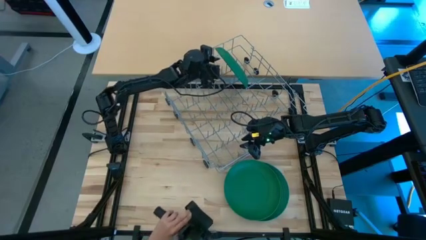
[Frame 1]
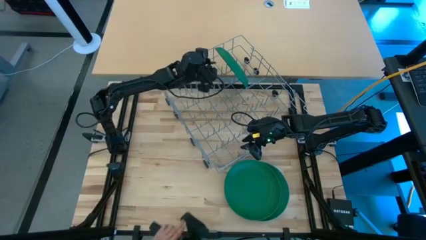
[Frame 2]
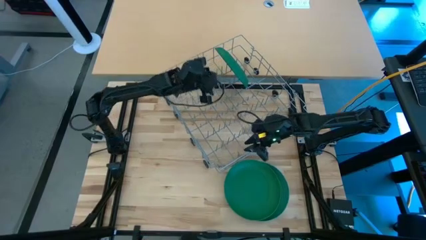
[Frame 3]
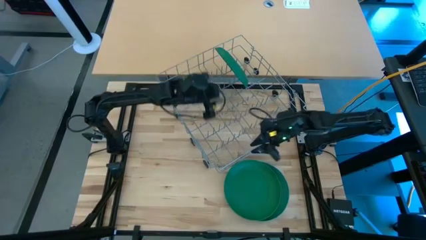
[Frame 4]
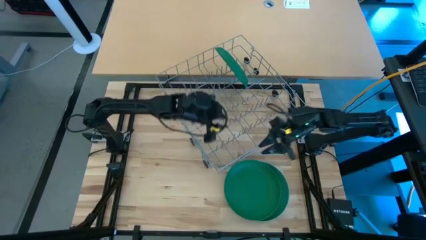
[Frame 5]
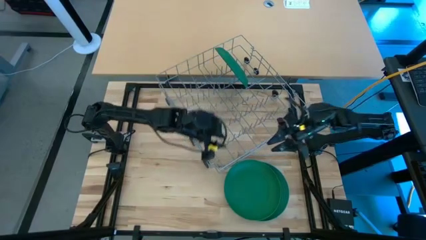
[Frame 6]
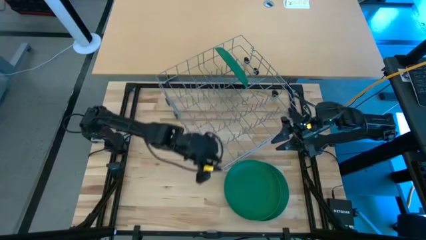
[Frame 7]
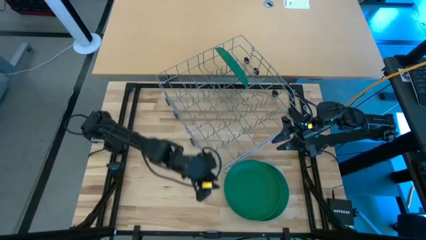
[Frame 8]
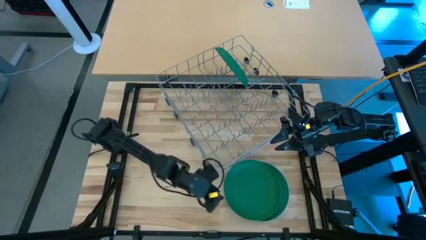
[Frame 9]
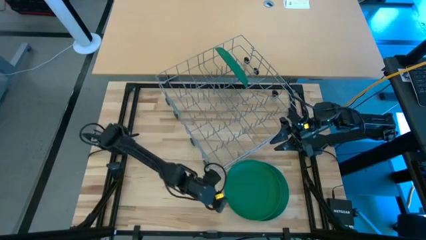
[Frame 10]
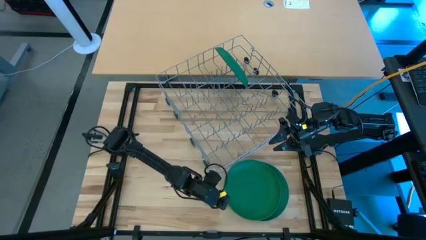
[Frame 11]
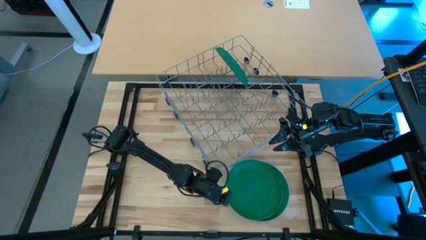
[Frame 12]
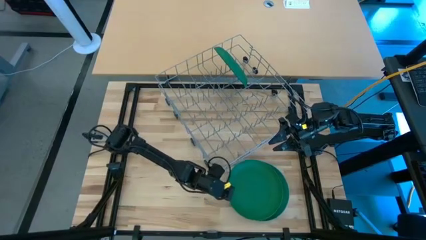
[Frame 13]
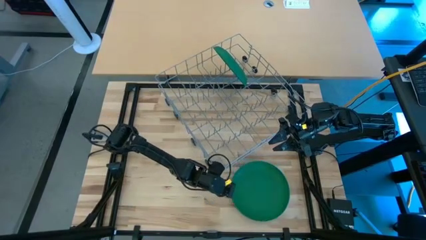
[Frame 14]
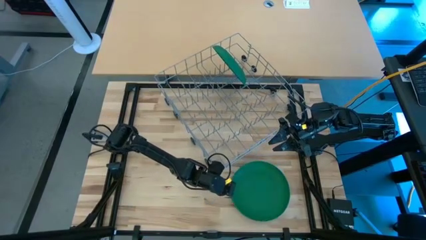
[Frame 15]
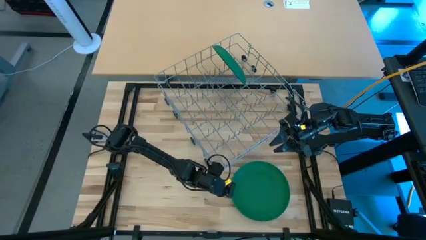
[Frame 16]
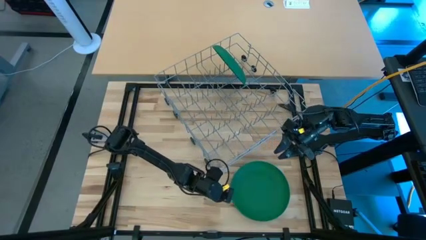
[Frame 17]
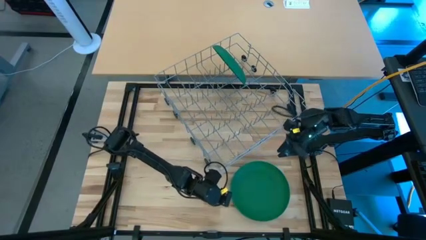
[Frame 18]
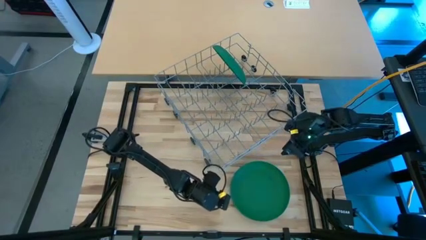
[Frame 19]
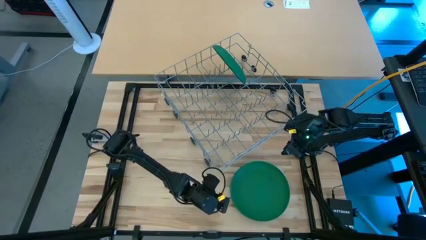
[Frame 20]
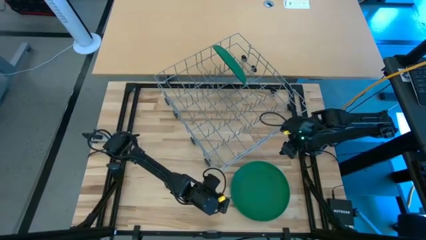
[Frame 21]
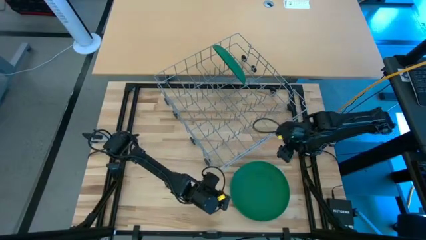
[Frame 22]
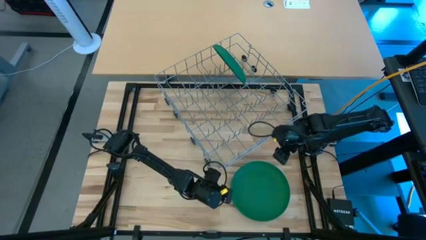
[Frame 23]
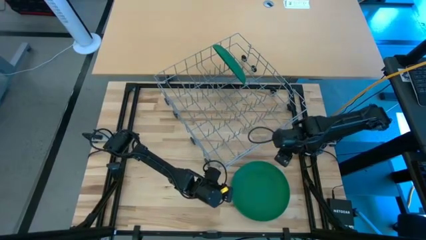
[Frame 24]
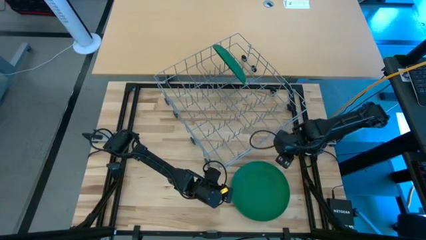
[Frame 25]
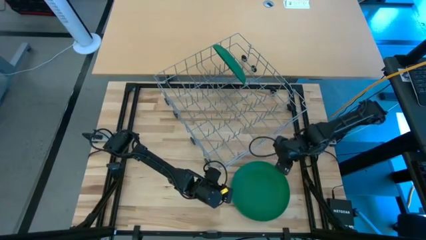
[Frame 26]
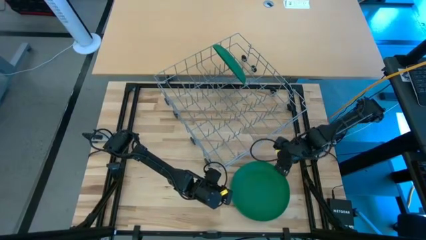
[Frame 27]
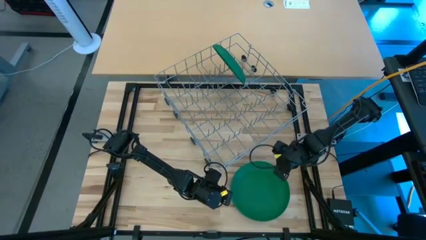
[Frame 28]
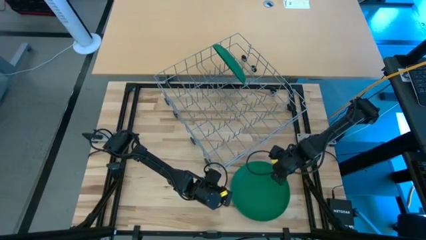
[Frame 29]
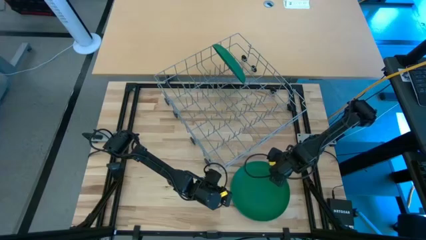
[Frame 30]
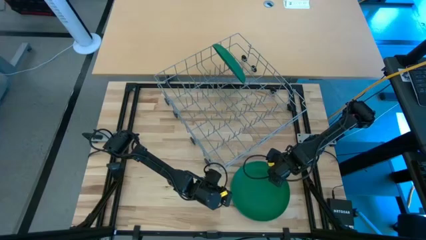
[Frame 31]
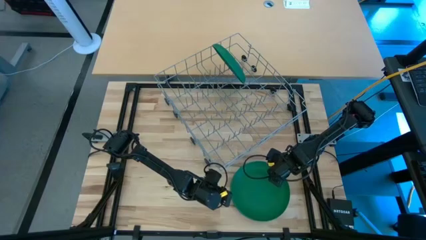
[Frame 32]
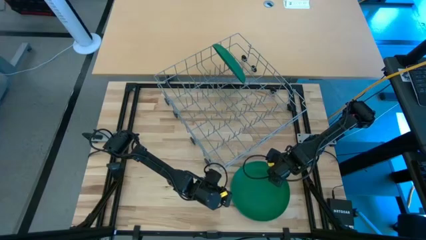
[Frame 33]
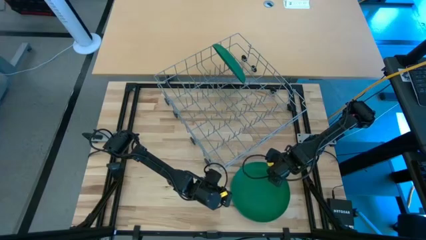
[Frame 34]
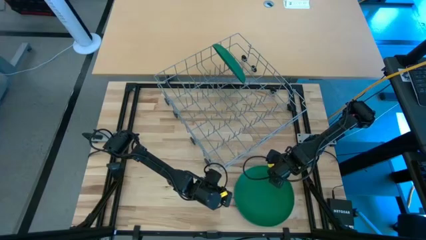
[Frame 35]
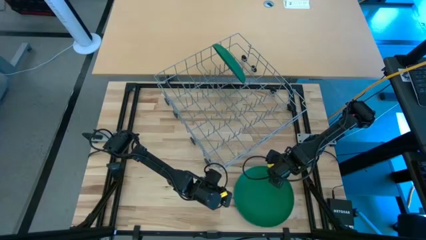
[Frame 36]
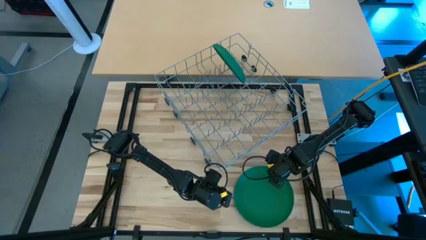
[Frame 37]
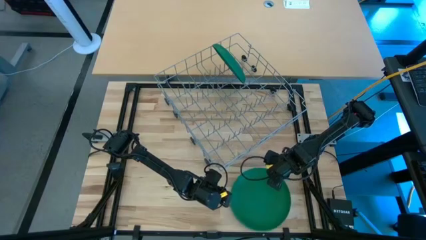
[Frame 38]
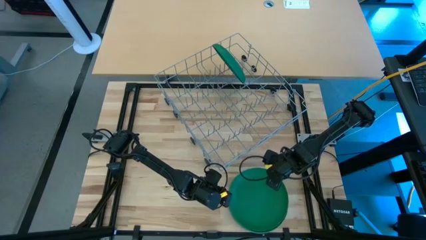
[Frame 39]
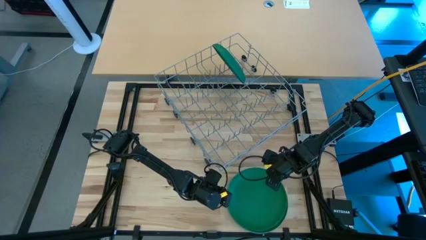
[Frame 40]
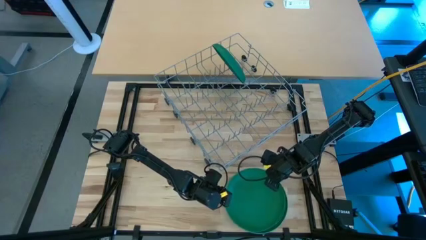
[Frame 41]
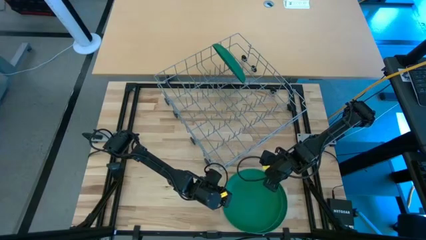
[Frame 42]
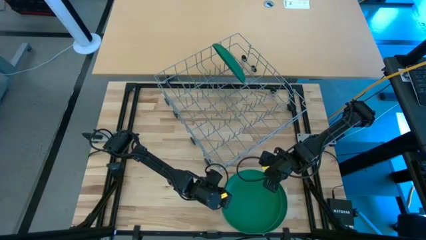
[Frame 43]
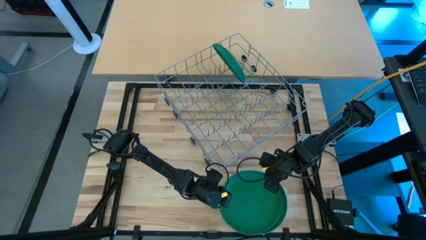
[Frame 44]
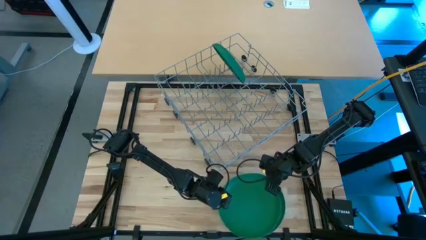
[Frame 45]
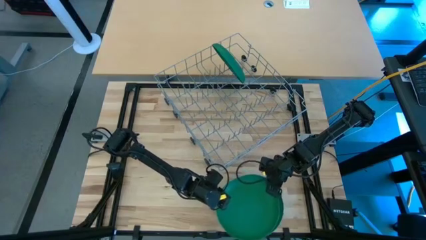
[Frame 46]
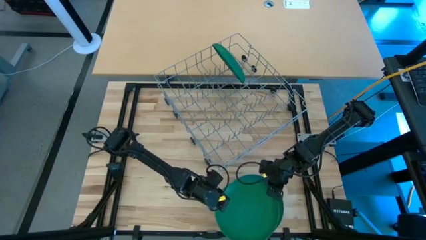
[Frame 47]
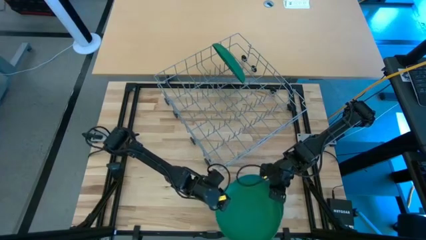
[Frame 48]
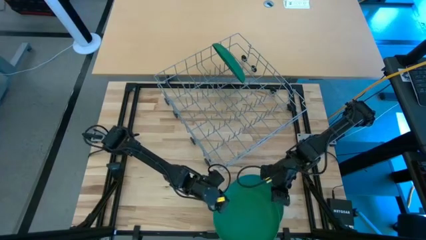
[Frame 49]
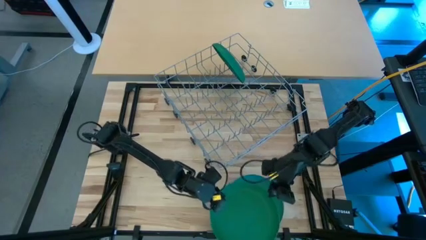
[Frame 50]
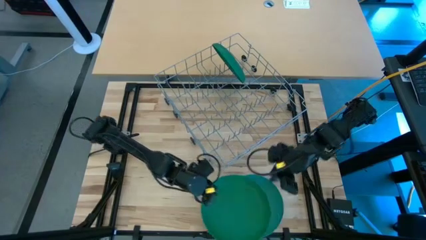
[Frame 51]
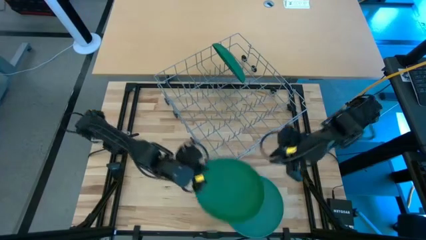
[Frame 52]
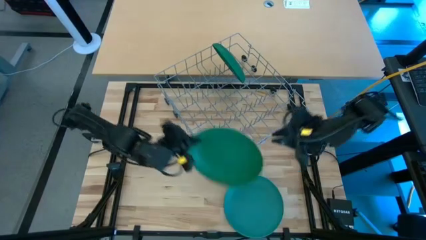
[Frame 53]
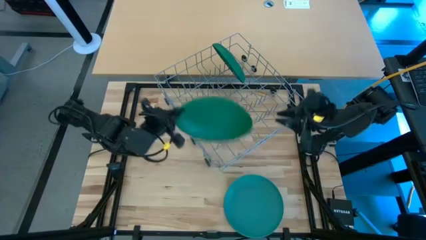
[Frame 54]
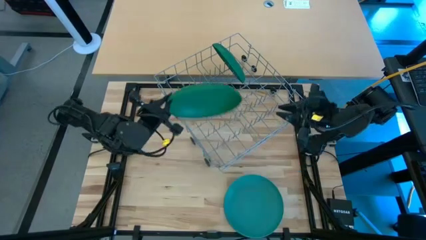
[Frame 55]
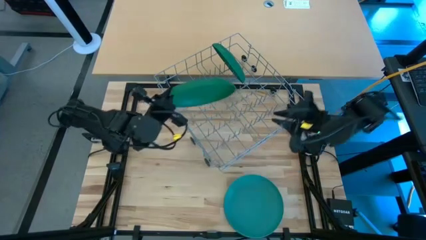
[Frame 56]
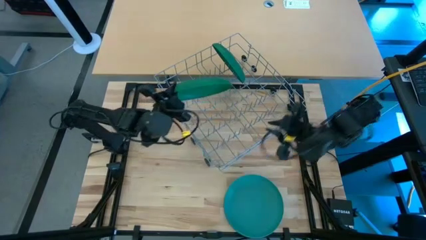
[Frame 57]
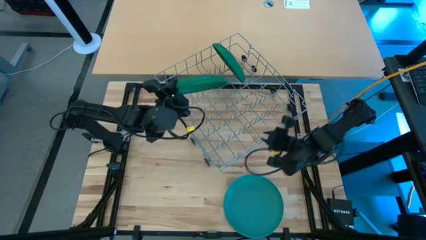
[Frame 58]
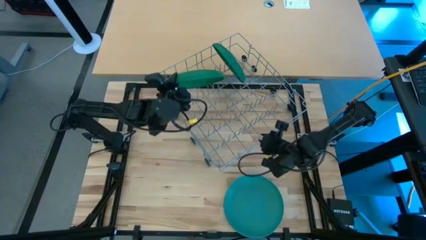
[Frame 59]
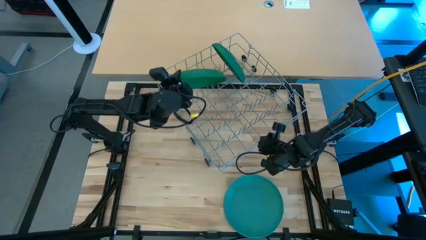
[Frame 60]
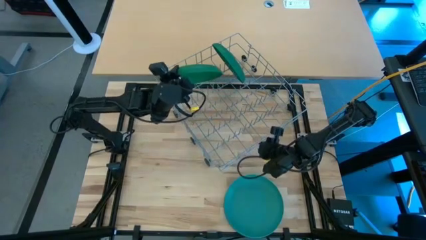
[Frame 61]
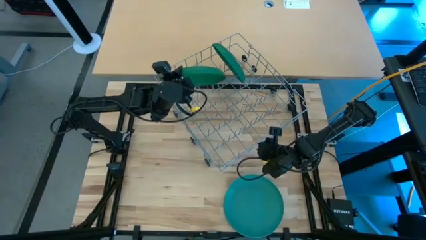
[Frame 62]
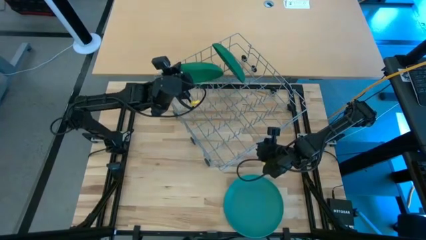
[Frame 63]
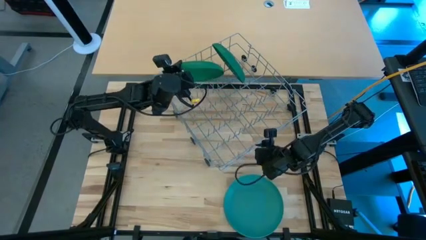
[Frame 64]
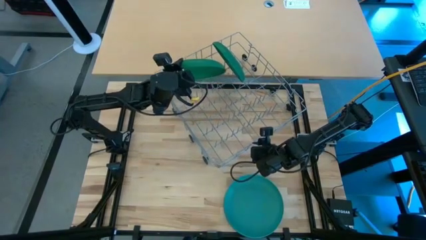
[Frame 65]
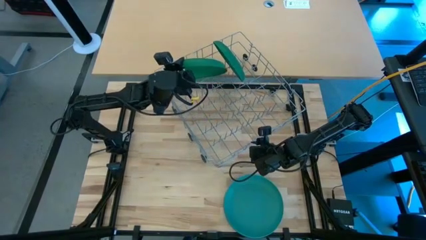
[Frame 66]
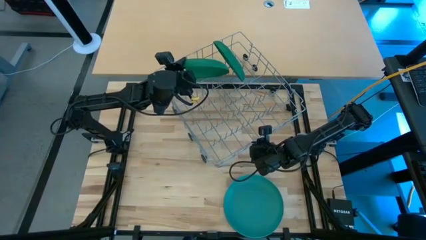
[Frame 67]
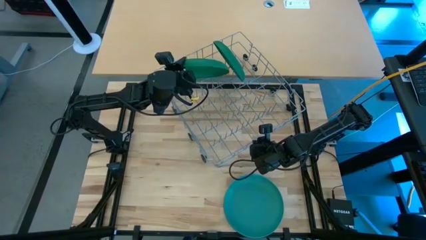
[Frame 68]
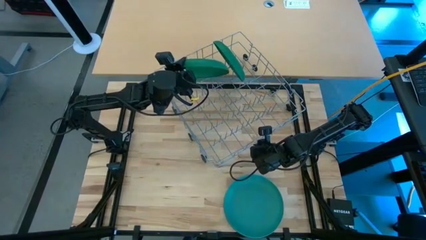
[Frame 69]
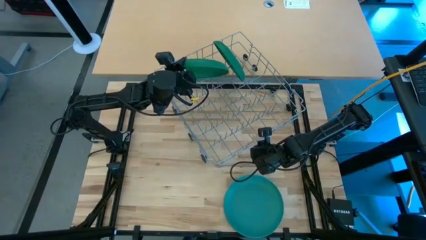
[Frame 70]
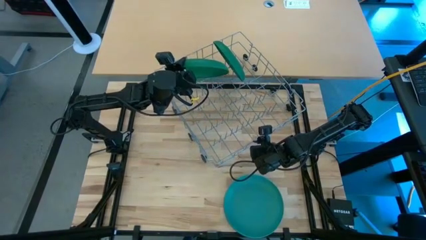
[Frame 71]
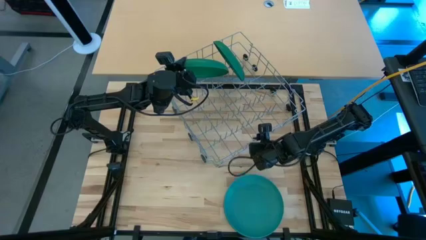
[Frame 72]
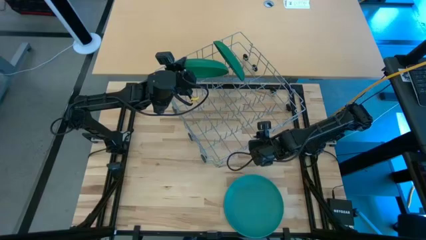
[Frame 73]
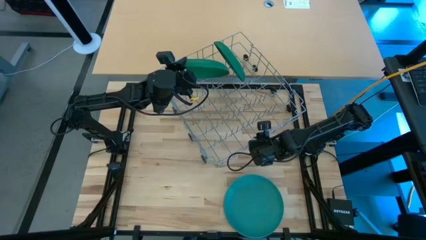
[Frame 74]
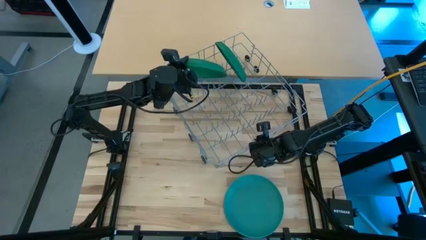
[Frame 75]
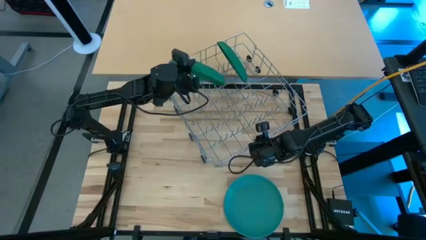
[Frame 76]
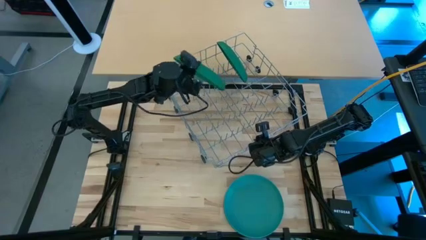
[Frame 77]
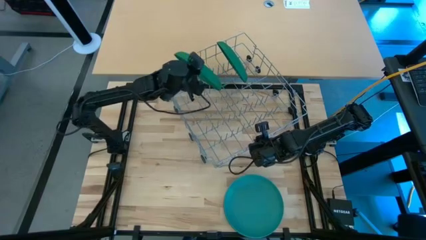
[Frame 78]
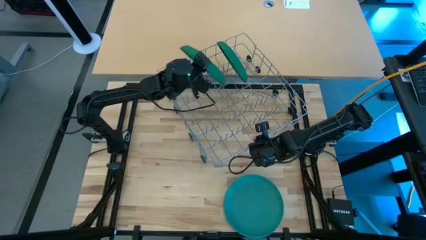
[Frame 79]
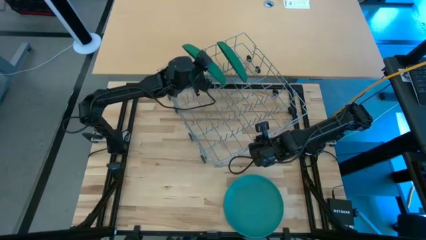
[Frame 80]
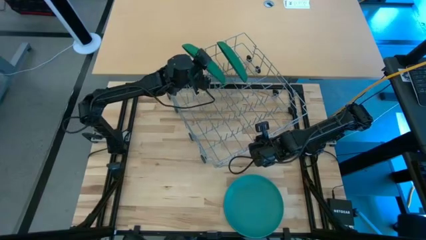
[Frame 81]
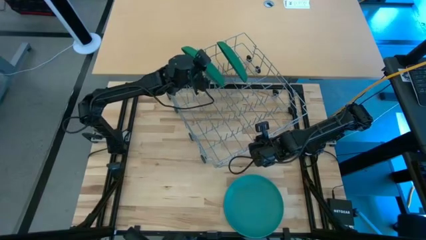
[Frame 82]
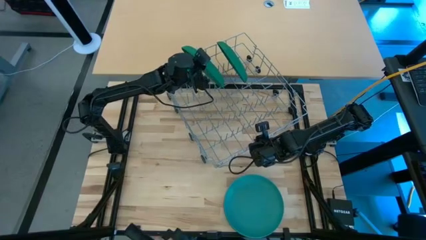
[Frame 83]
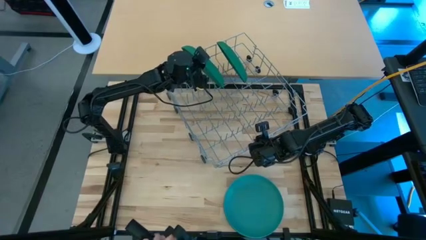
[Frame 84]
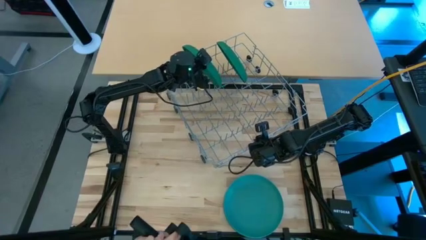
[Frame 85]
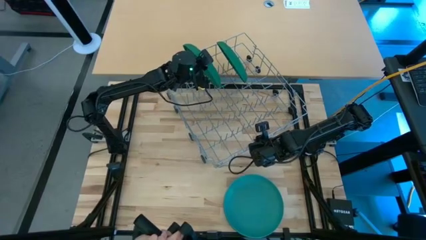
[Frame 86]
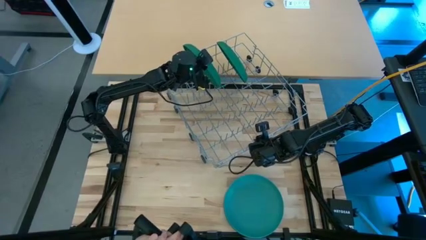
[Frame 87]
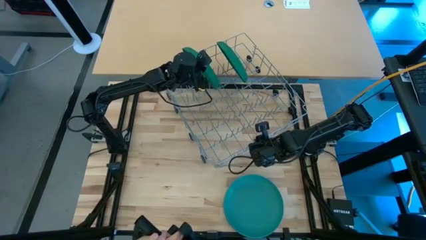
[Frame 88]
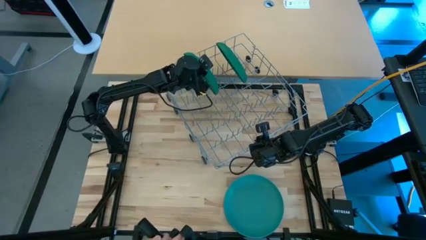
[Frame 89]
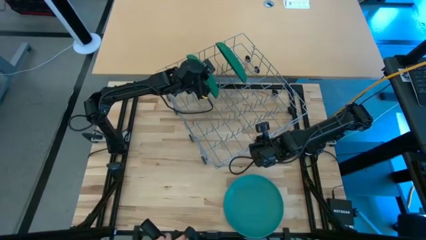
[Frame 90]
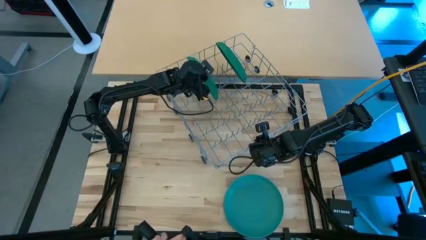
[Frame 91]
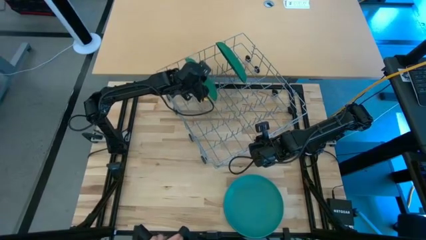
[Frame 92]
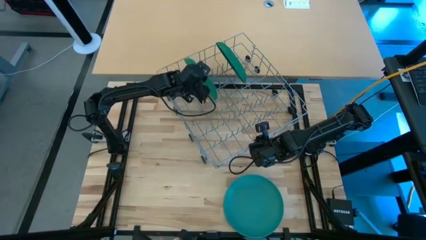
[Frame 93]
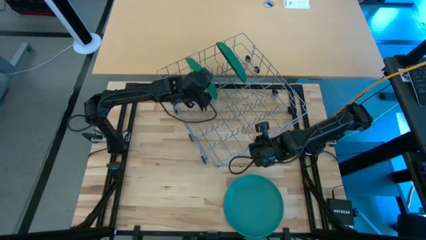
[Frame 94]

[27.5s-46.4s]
Task: Sort dishes
Put the green plate into the dish rack
